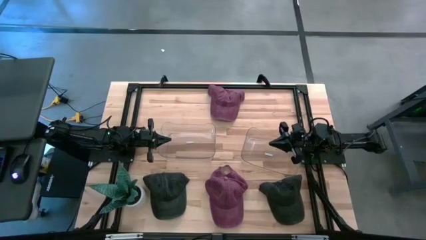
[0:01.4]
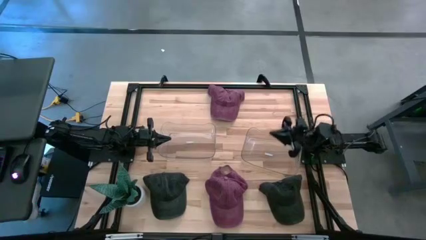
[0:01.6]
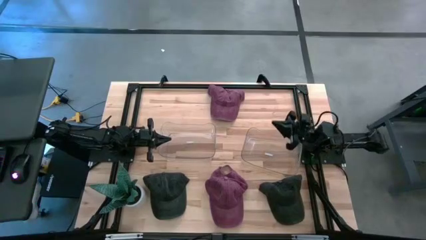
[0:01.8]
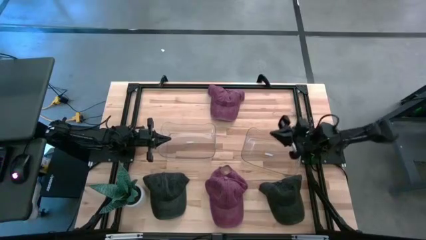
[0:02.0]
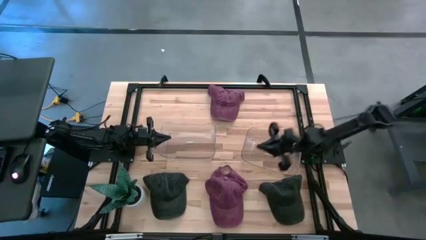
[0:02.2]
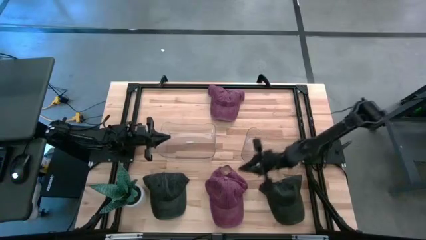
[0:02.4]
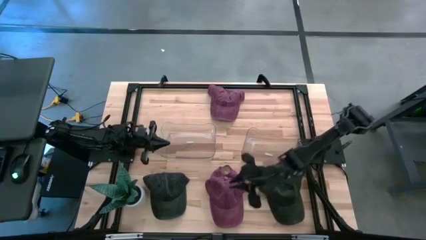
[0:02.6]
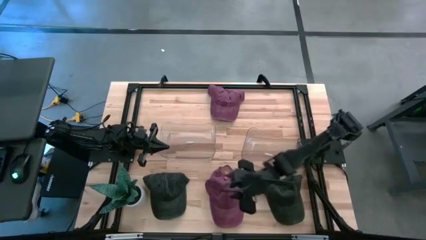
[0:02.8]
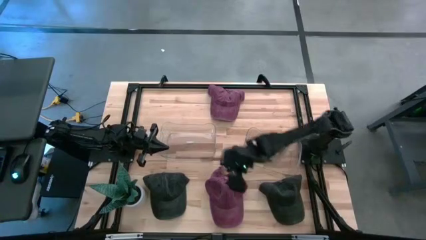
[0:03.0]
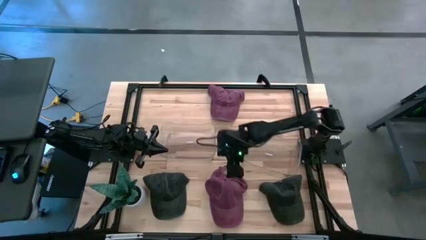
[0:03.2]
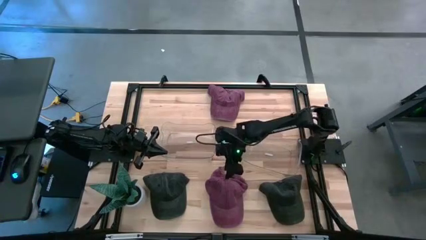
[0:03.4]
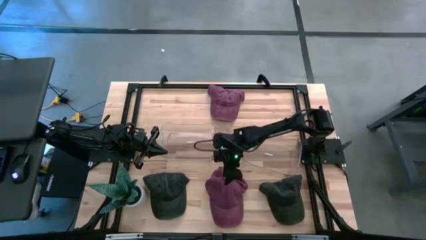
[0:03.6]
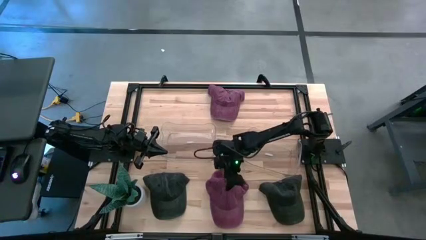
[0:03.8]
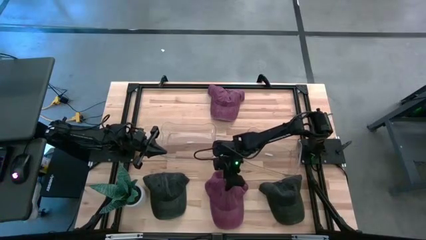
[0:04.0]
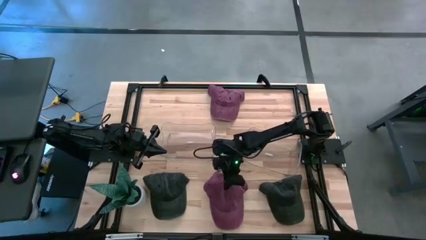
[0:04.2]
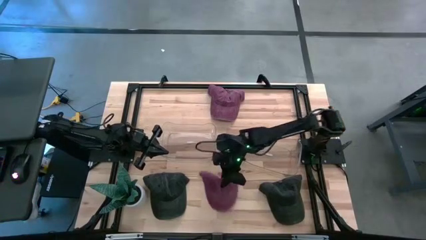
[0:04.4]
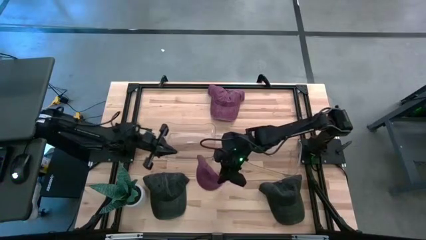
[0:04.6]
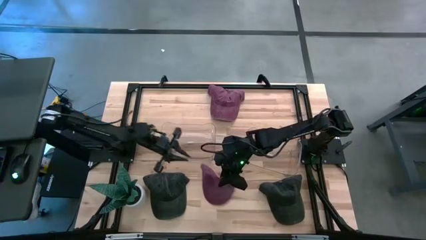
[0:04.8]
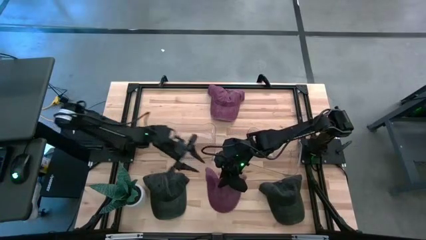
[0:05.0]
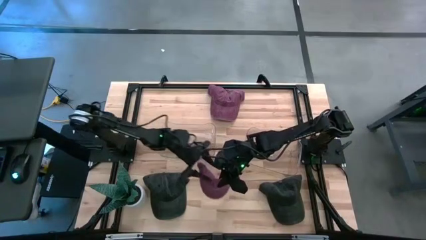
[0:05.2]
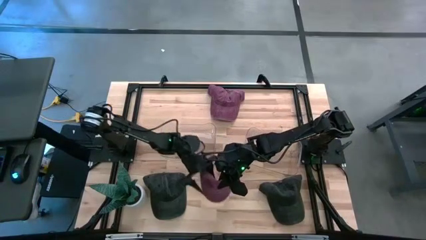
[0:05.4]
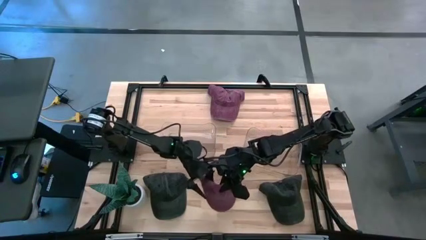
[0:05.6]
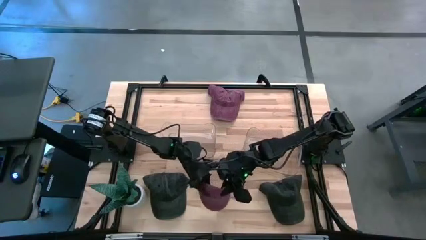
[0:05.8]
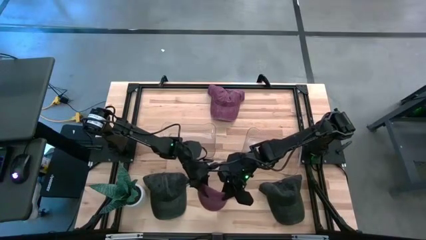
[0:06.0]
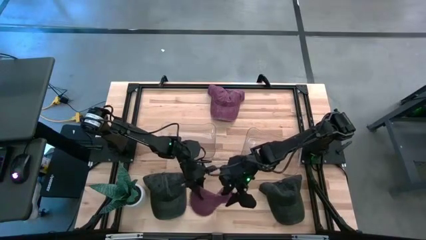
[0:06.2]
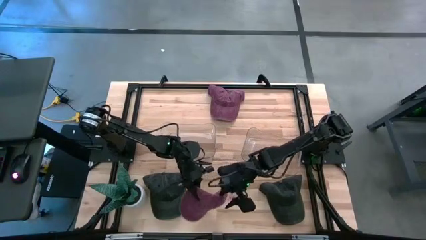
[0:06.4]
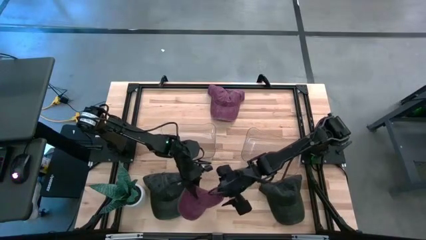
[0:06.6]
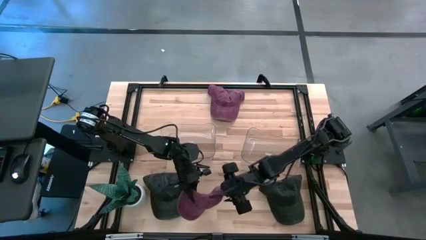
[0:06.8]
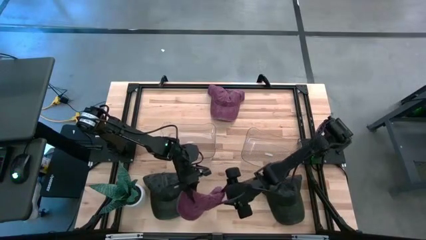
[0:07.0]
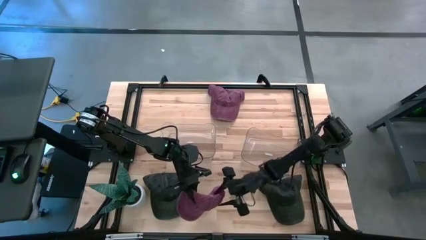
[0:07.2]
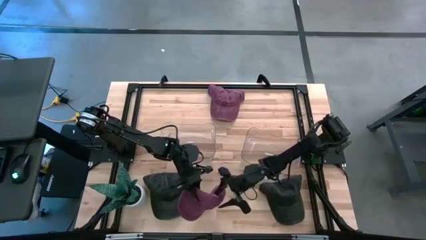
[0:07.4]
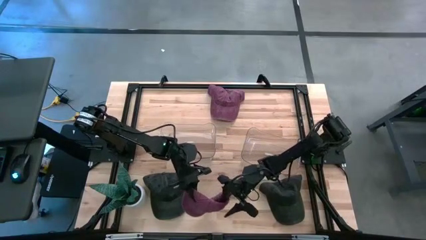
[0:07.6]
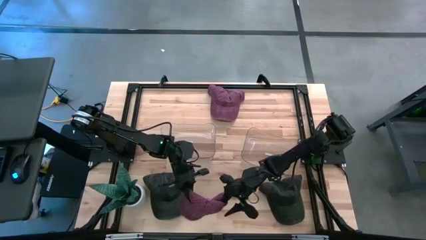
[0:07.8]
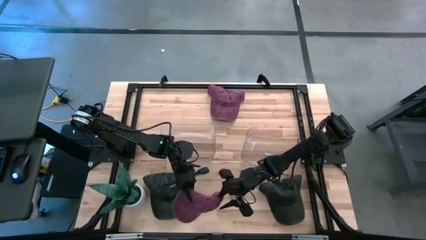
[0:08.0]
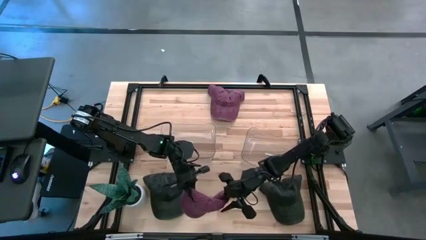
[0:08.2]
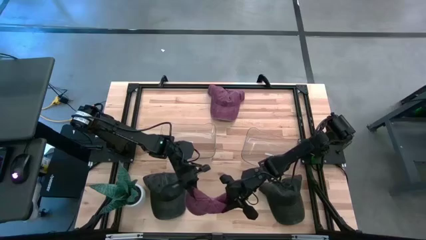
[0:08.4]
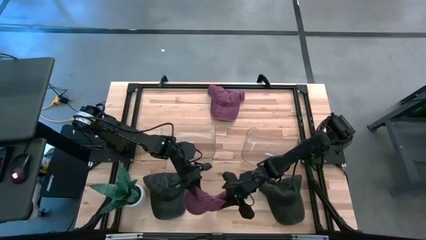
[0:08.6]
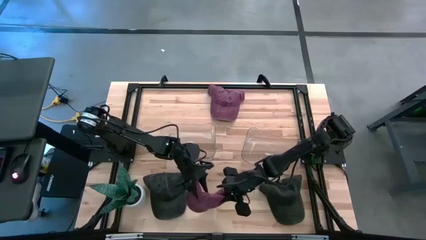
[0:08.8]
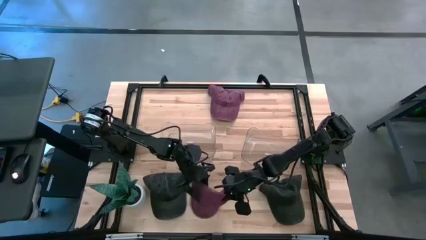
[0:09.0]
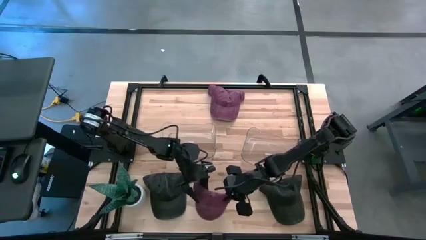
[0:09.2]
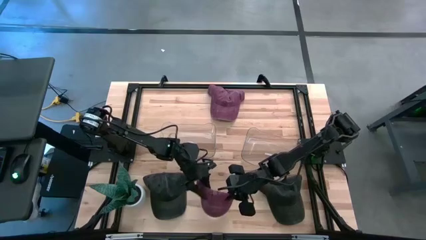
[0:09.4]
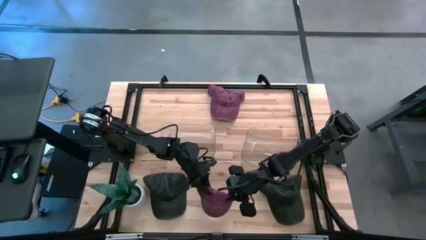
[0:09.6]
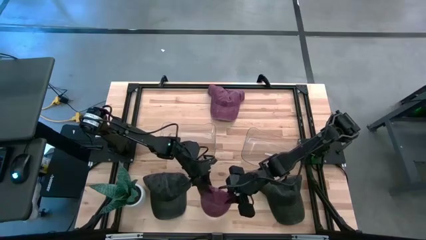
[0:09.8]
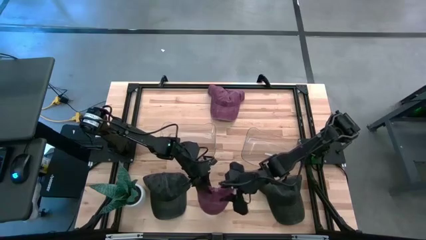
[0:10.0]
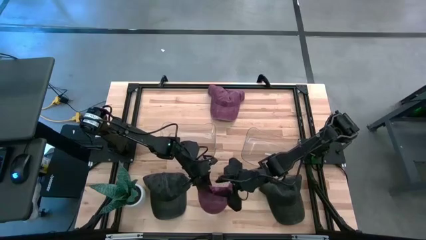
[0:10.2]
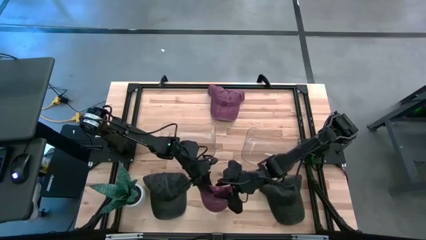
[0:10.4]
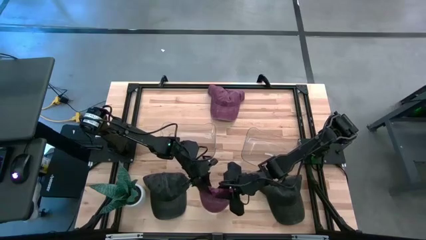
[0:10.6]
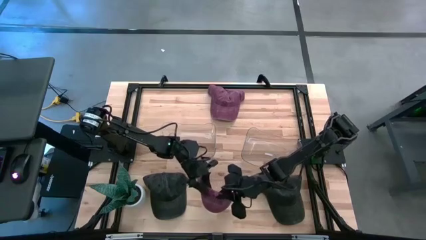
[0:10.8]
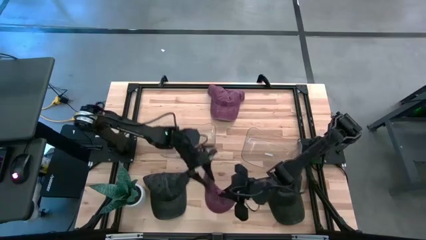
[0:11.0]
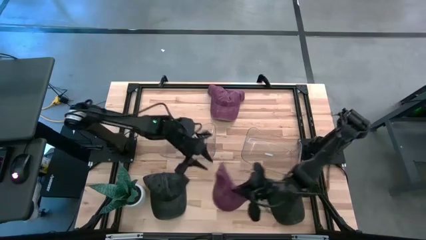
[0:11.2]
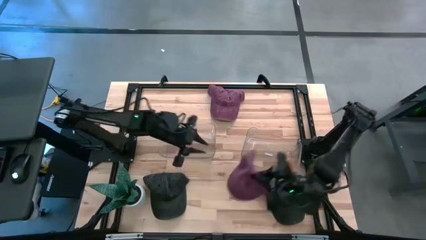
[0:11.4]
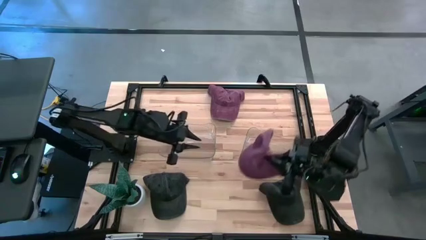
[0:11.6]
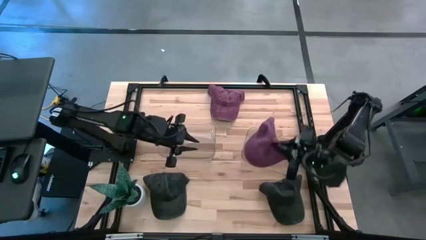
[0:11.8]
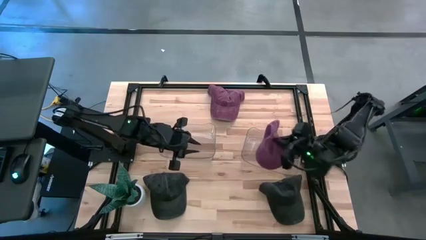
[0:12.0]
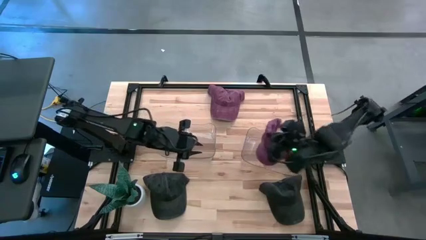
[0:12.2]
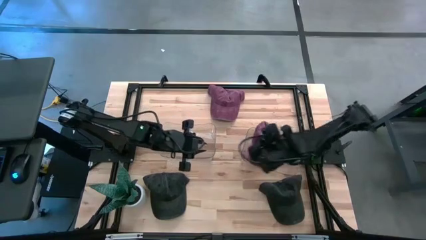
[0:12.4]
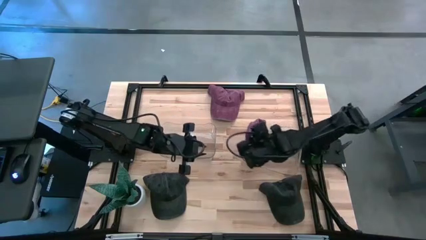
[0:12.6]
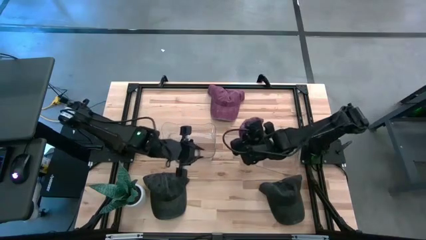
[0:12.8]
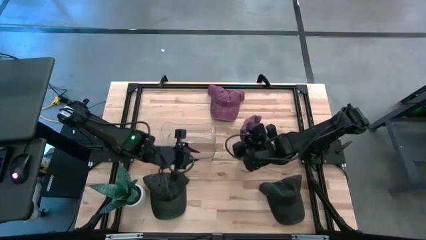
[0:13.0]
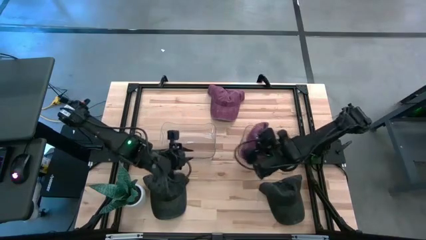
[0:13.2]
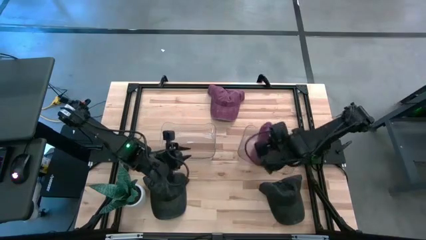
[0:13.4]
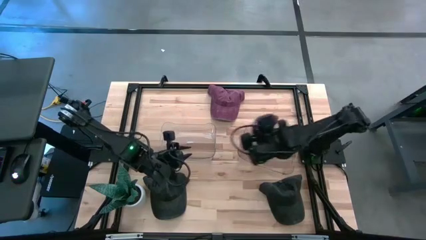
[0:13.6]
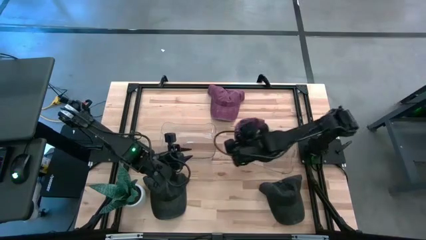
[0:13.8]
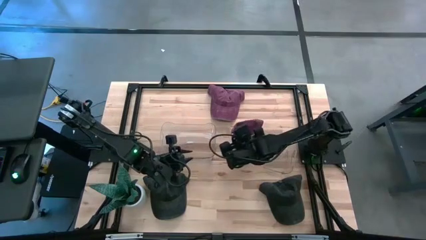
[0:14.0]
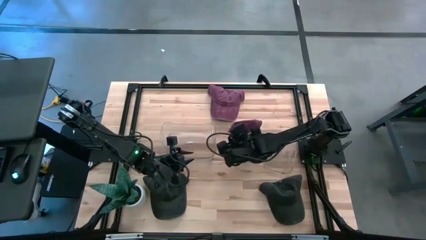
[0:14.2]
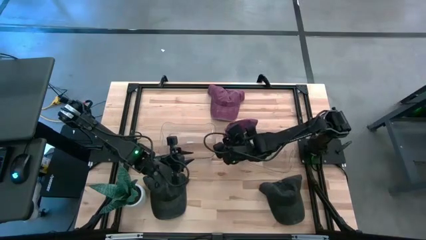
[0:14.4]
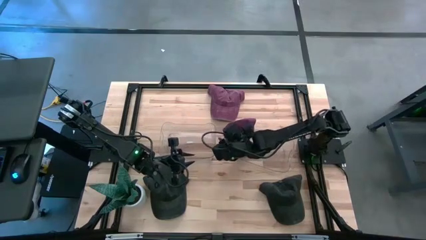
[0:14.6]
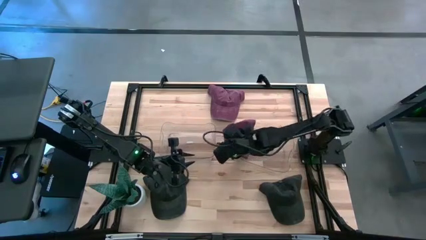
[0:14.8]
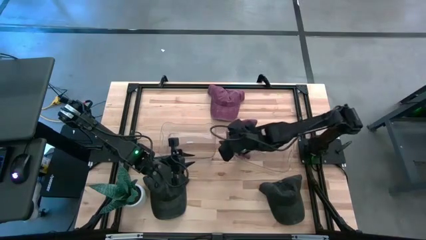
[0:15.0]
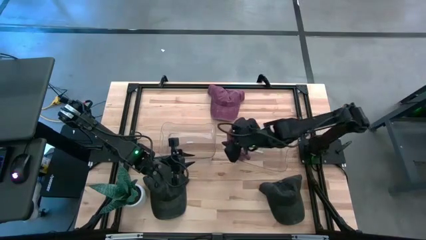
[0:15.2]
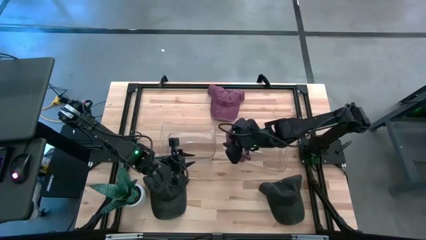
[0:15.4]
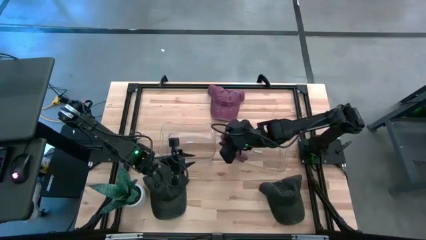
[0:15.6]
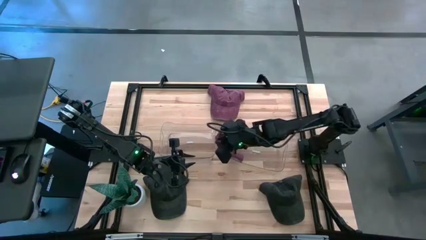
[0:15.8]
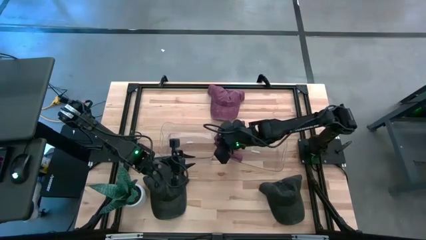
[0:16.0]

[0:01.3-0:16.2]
Task: Pick & Place hat
Put the bottom red cap into the right transparent bin
